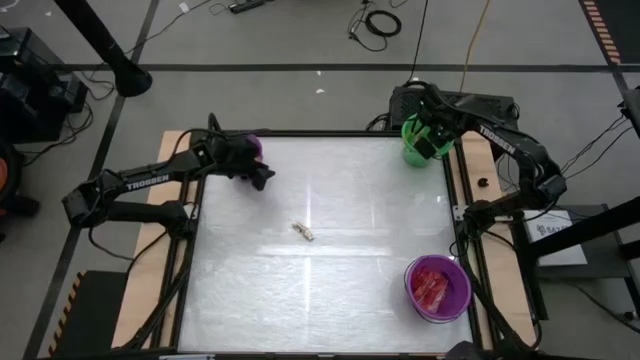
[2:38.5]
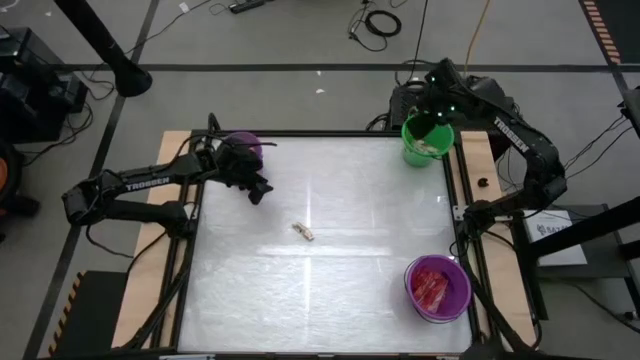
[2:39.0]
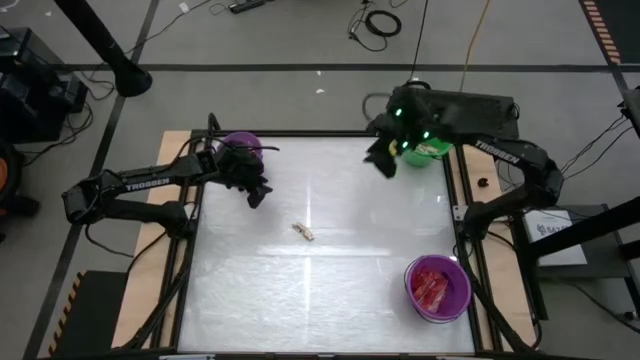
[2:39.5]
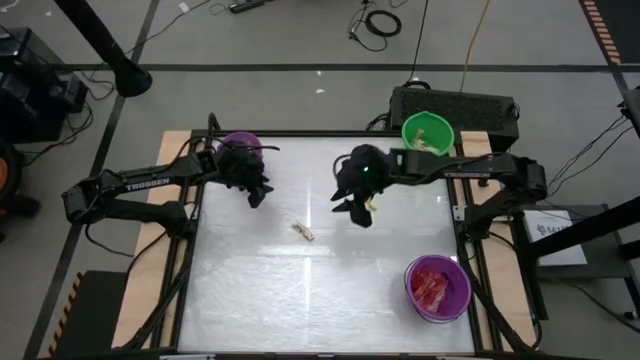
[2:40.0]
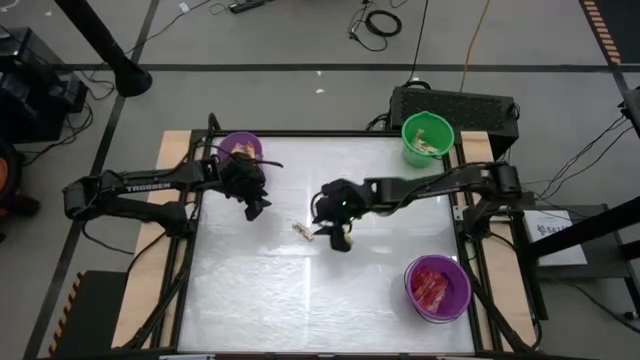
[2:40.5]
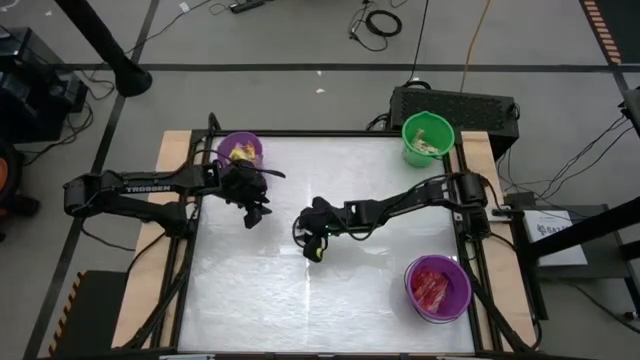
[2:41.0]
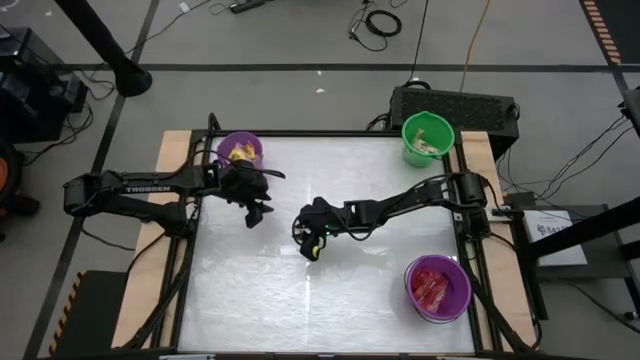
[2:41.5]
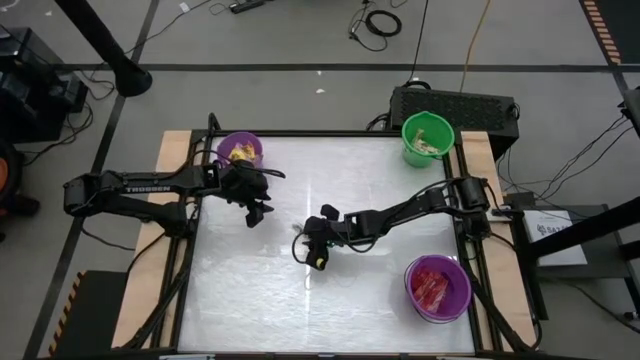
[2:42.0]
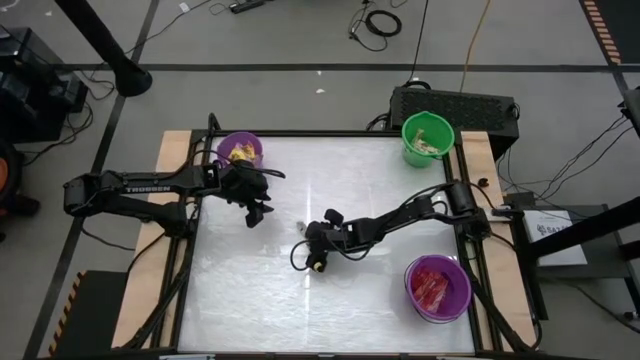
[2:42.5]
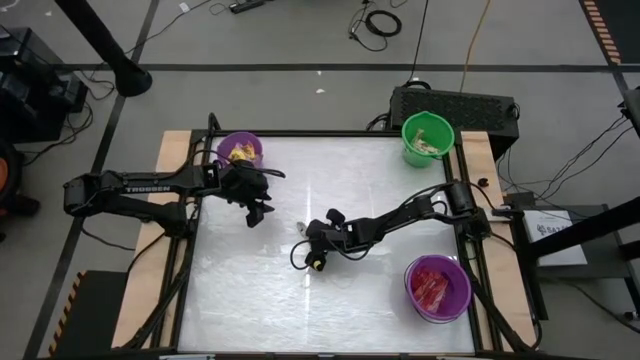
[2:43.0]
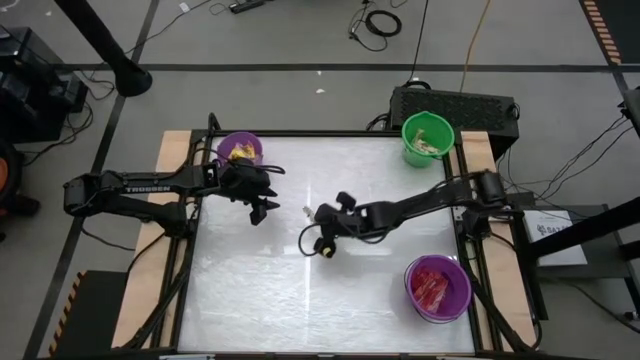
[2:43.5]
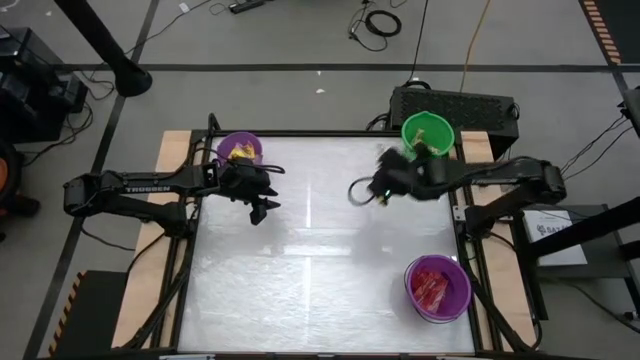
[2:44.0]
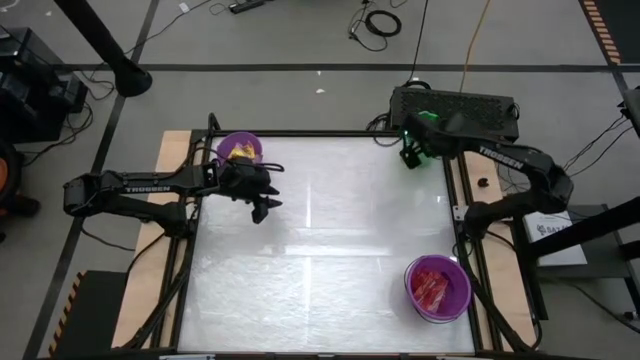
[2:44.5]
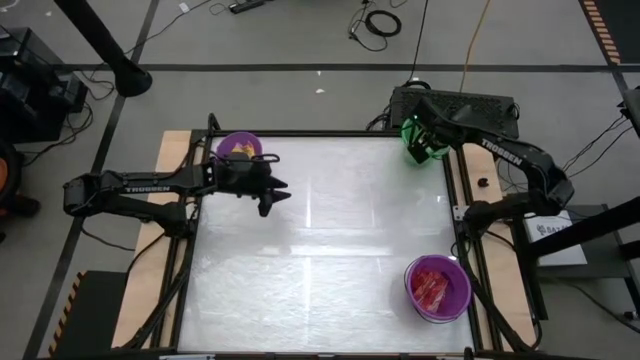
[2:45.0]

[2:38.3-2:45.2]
Task: Sort candy by brand, put in halloween buckets
Put the white candy into the green bucket

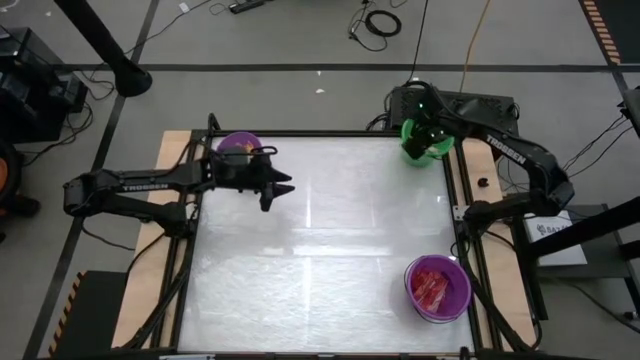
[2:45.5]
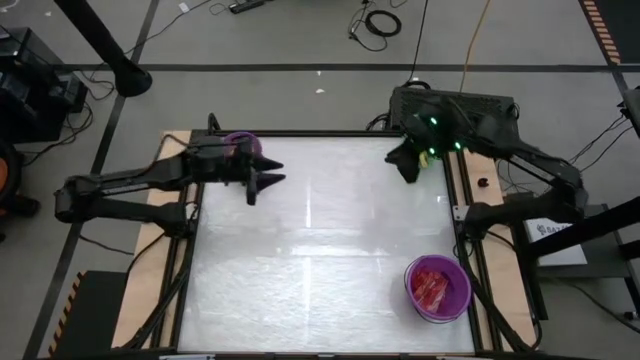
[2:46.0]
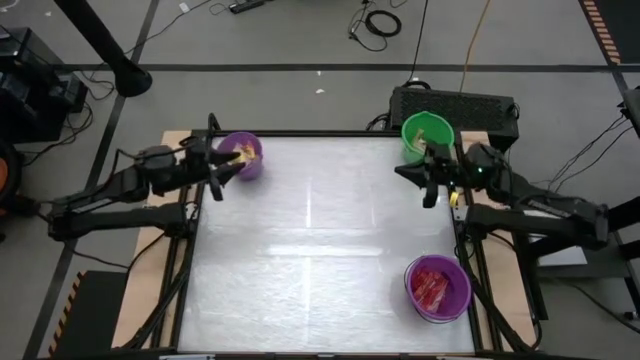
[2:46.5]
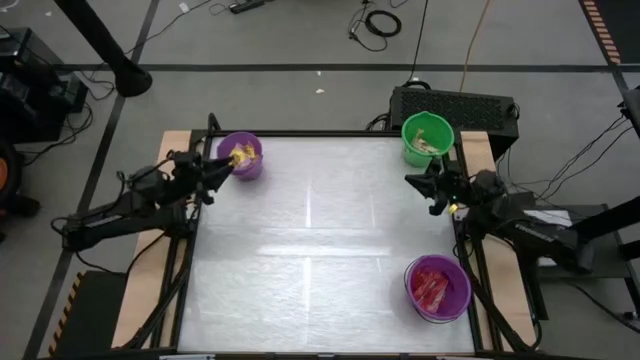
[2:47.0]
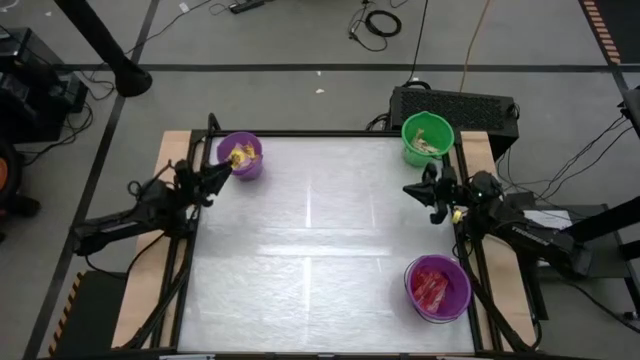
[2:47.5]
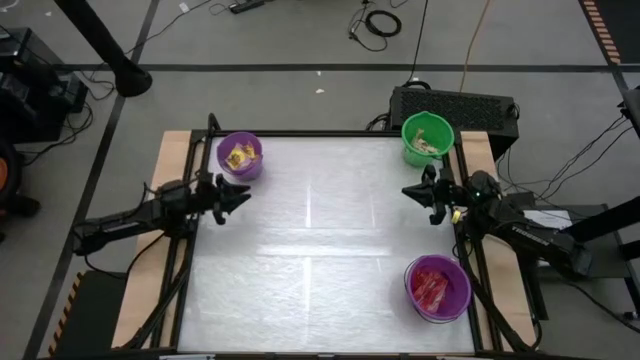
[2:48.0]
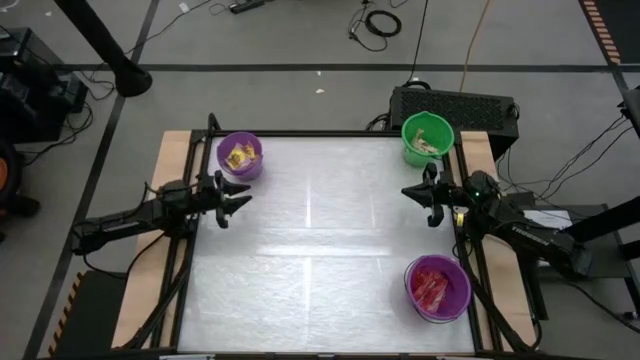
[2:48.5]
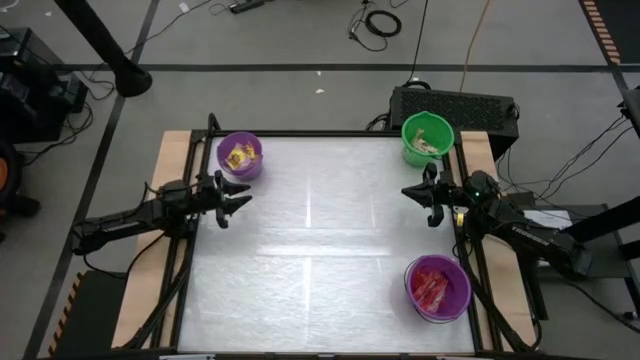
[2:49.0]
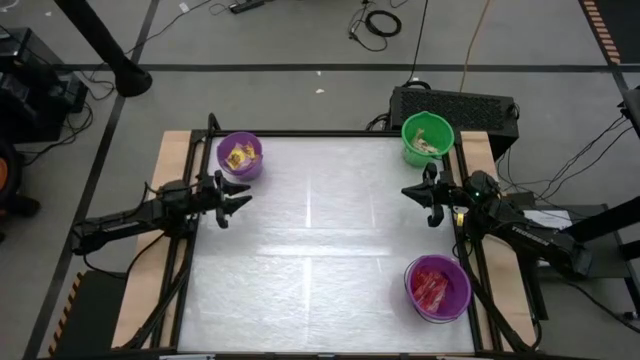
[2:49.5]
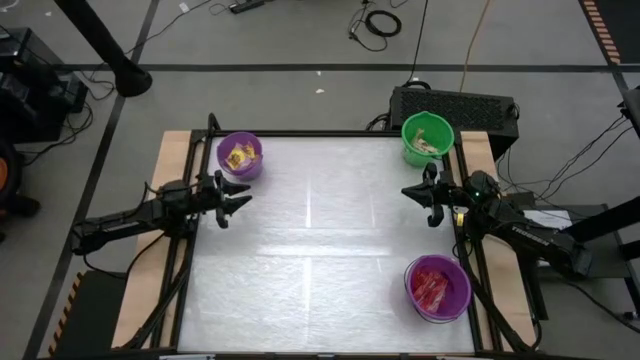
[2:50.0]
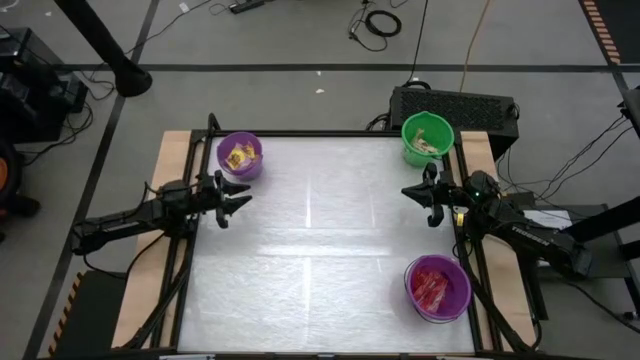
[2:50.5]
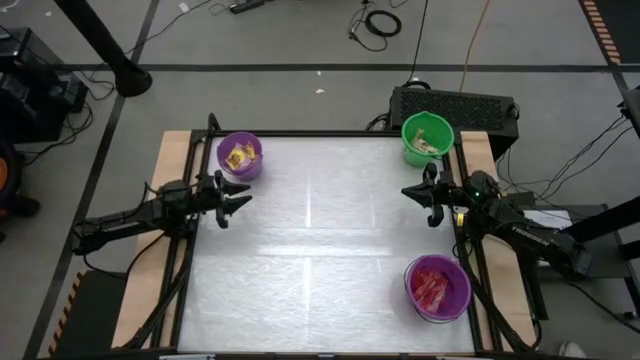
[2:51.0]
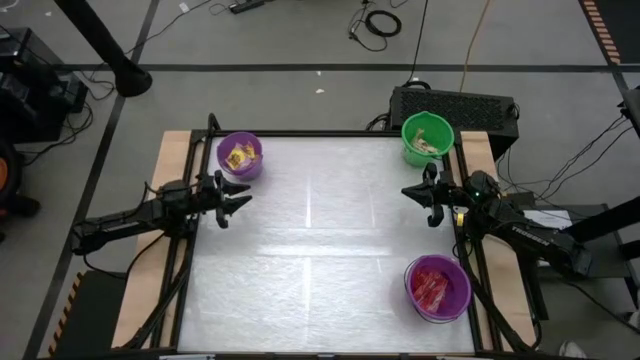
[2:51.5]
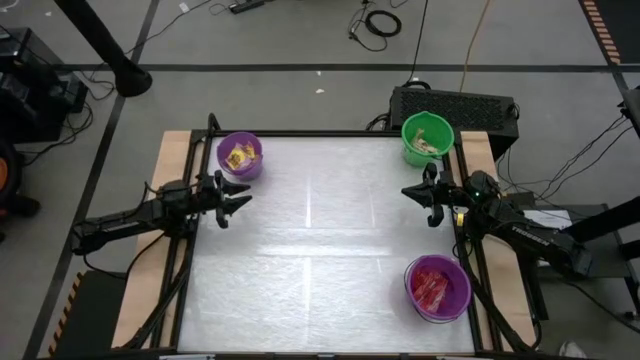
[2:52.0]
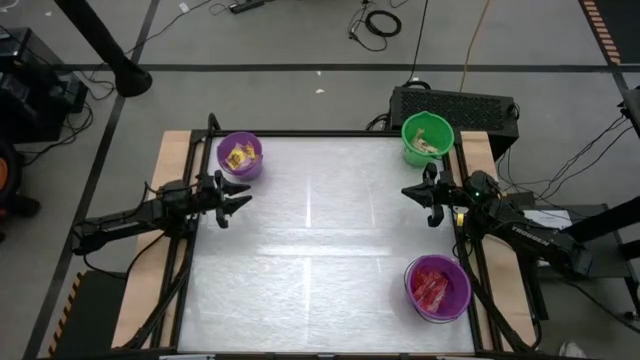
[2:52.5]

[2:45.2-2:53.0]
Return to Home Position
